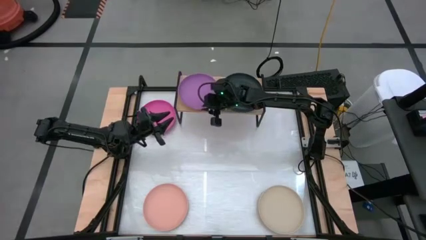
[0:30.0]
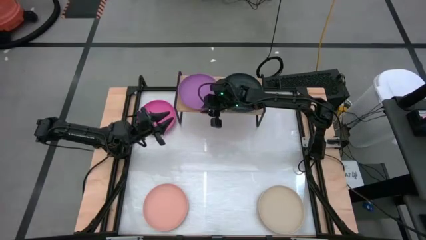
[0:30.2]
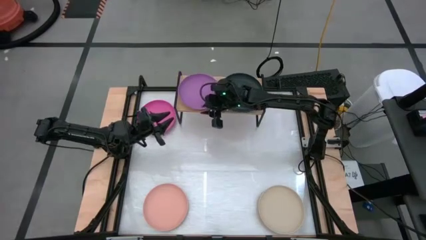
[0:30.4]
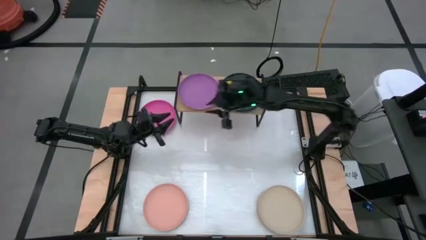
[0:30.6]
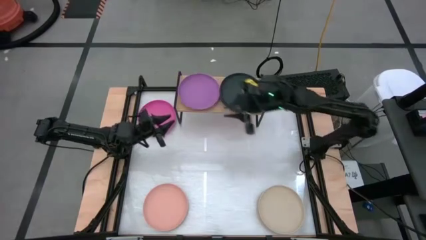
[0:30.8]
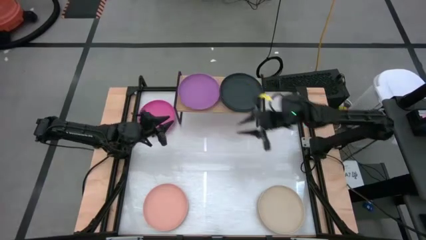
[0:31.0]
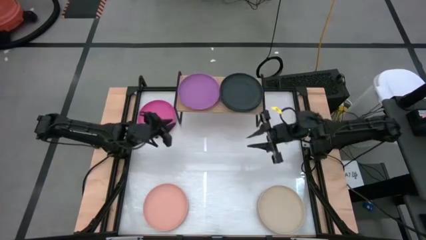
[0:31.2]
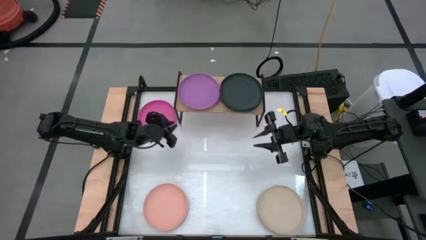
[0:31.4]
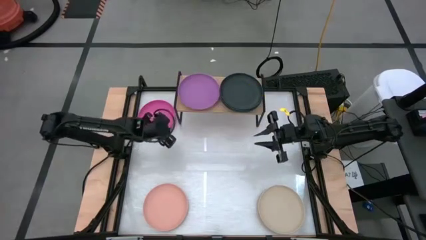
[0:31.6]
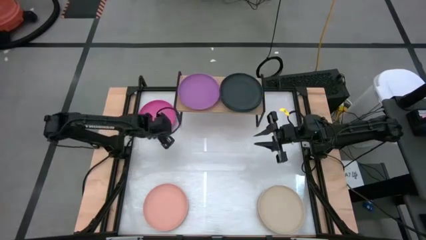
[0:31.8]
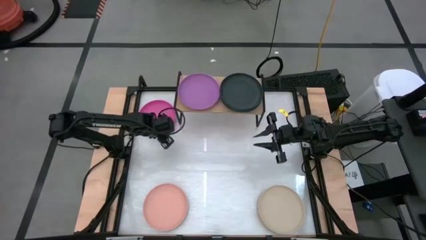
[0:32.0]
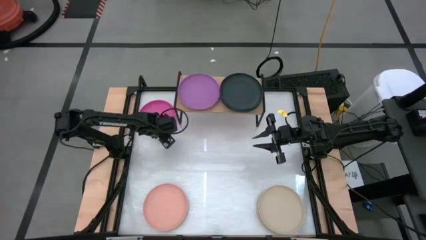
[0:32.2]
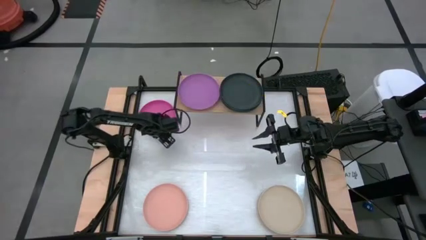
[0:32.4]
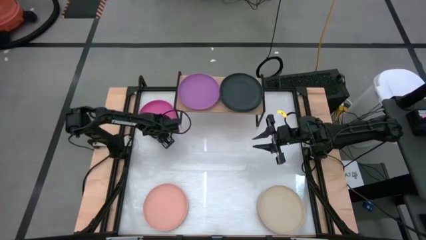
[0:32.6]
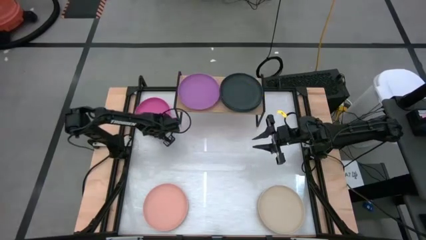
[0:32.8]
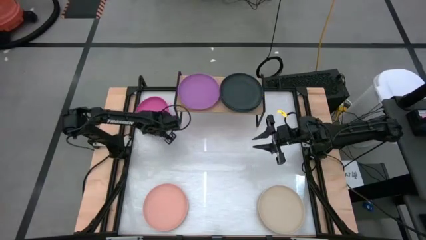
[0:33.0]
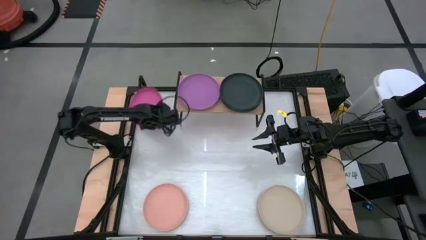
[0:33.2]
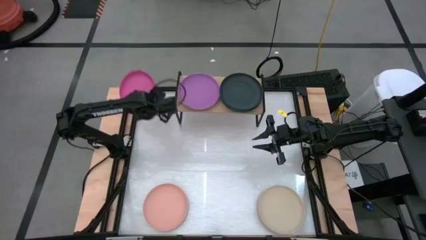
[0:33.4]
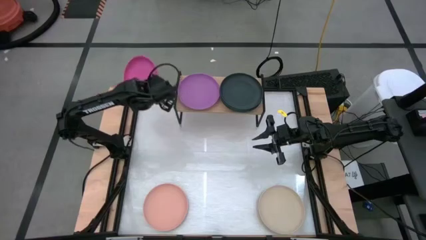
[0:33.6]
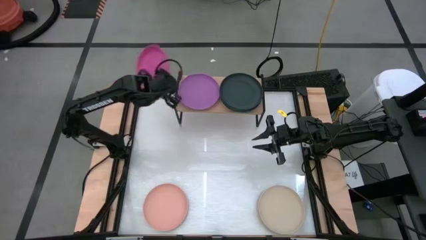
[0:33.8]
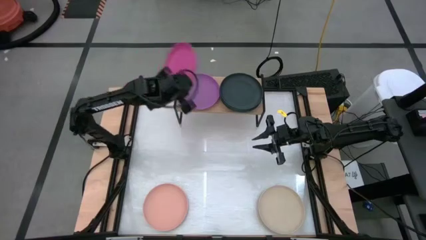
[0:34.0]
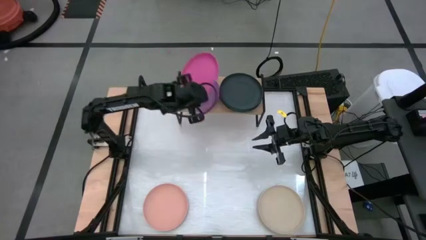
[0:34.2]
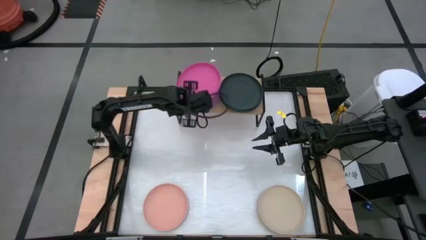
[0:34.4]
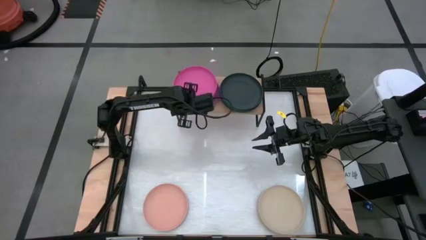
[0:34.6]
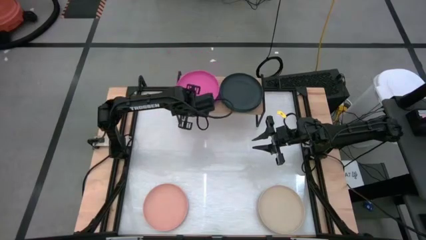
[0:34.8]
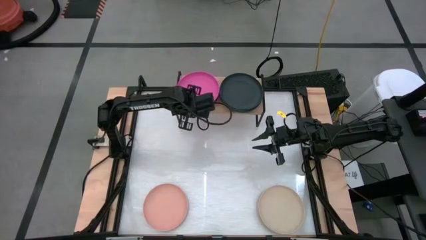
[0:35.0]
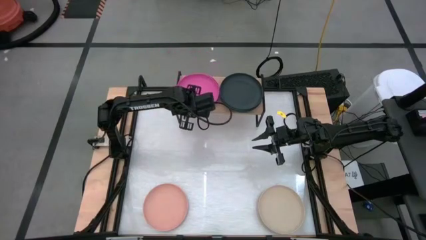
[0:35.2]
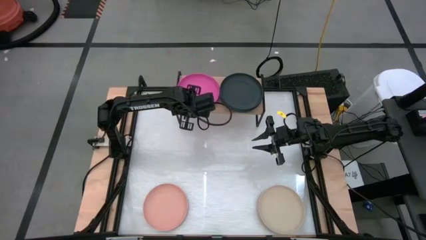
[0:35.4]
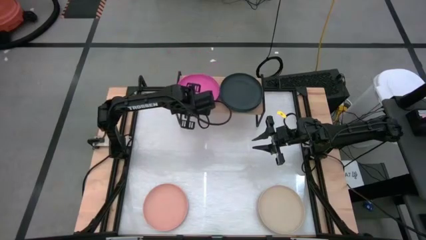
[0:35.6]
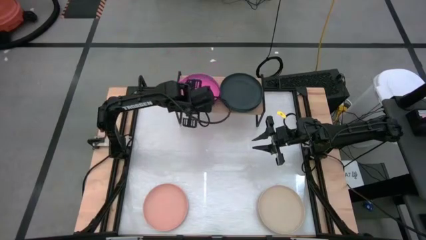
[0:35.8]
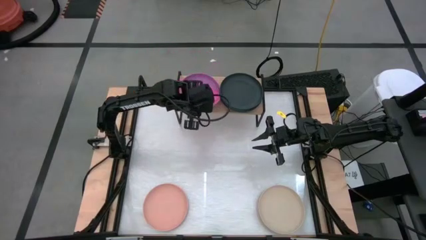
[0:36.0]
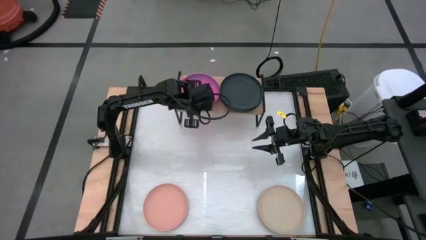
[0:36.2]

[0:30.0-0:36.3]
Task: Place and stack plates onto a shelf
Stack the pink plate on the purple plate

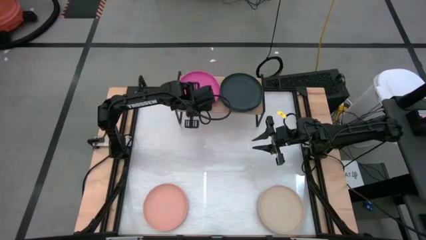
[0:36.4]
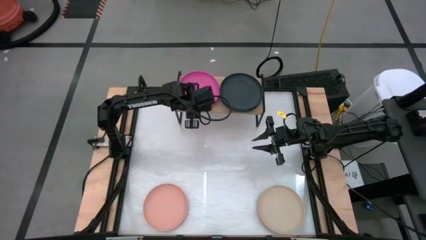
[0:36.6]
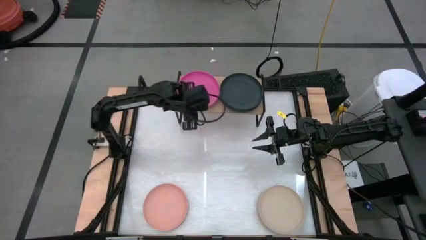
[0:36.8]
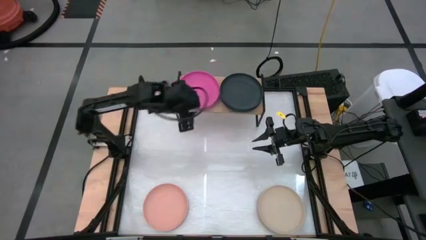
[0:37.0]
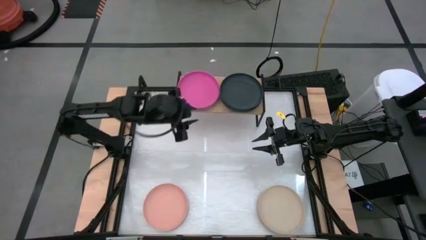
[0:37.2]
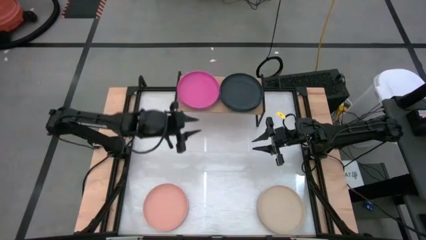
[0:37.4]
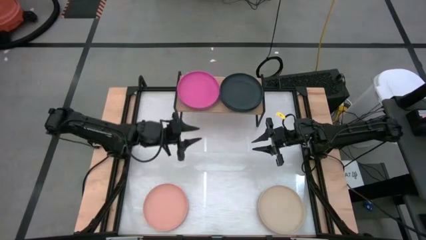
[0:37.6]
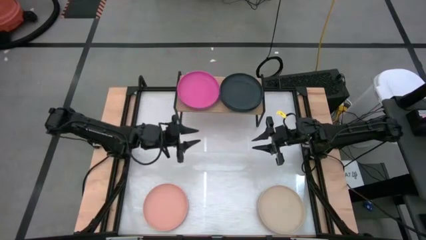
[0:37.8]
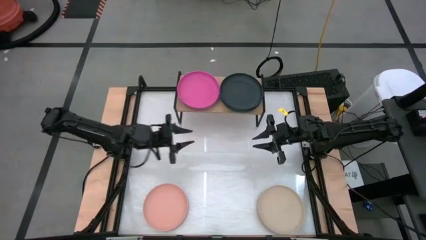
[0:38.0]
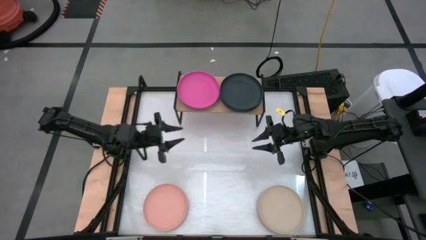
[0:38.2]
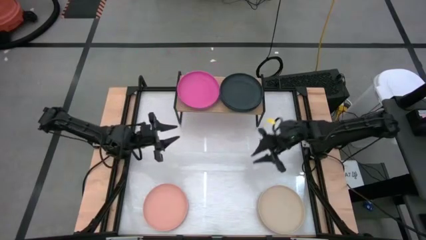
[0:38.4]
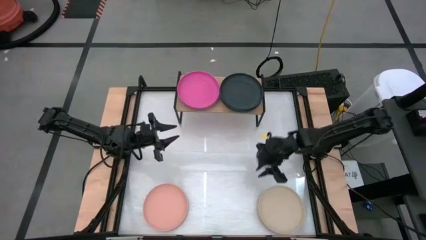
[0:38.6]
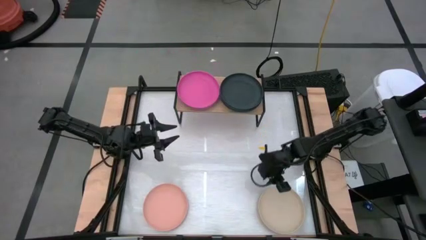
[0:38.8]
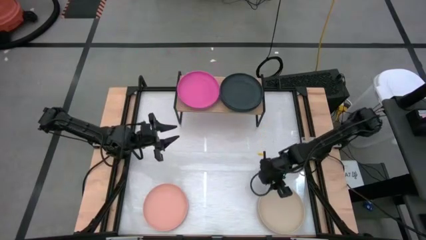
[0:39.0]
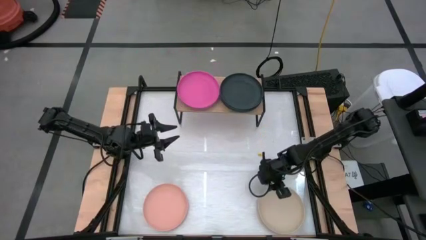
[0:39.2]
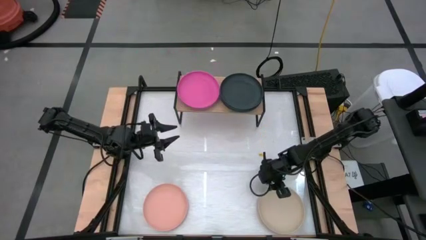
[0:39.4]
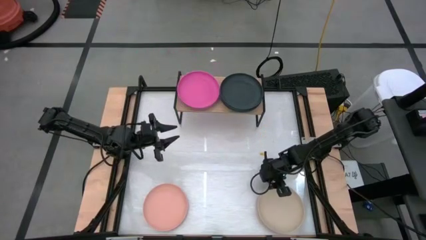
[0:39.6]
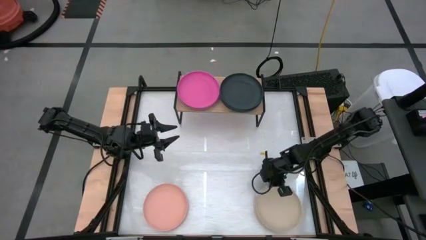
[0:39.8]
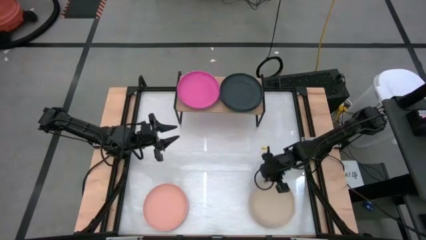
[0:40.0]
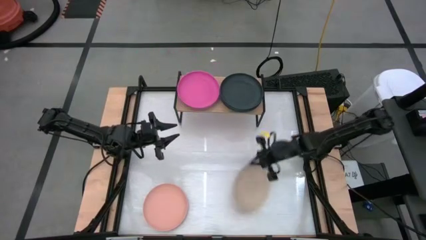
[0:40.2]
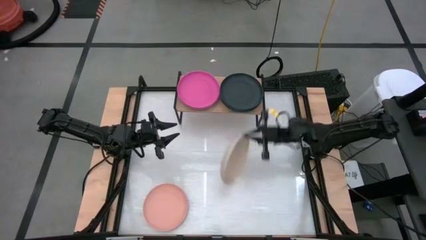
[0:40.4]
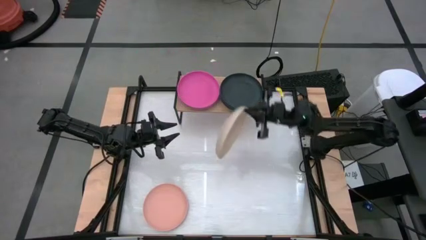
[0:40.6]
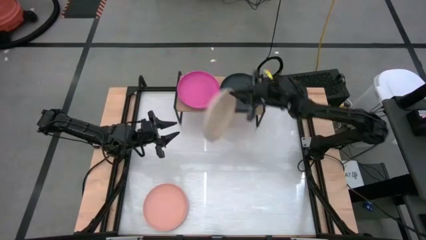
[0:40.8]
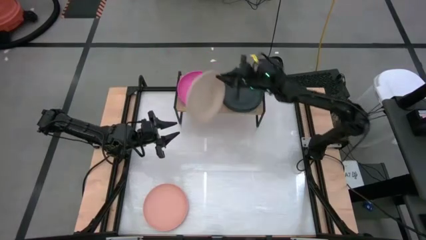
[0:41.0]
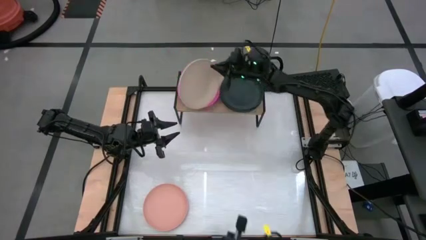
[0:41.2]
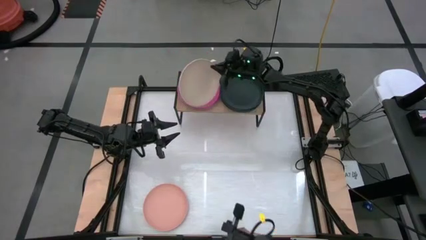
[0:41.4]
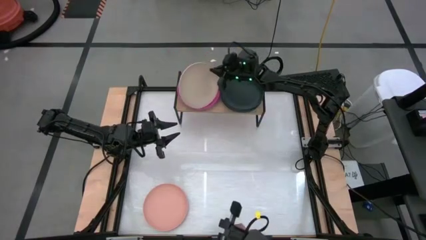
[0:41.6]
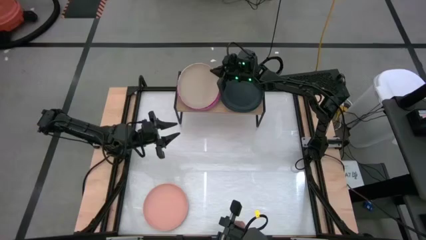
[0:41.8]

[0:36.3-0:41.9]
Stack the dark white plate on the pink plate

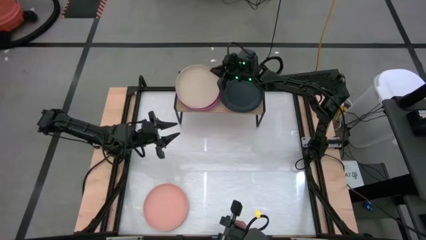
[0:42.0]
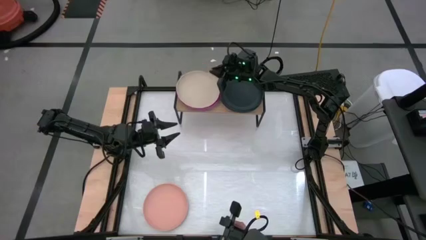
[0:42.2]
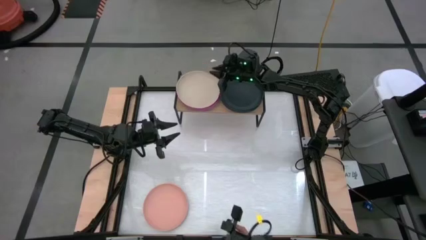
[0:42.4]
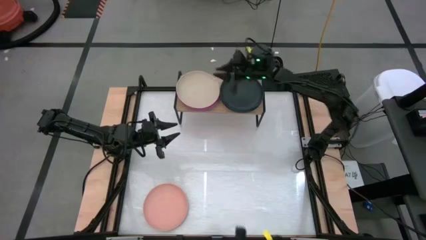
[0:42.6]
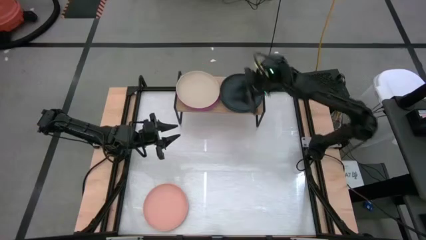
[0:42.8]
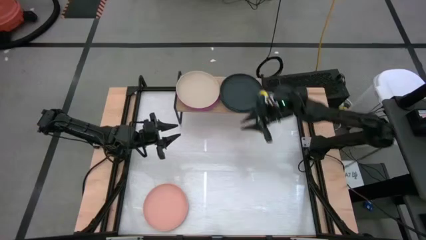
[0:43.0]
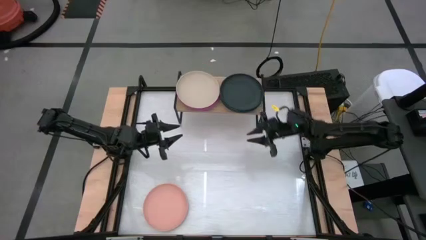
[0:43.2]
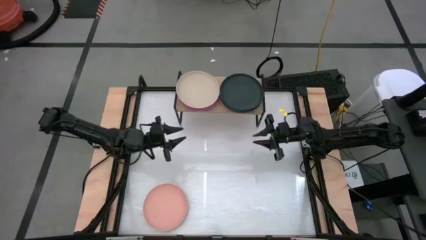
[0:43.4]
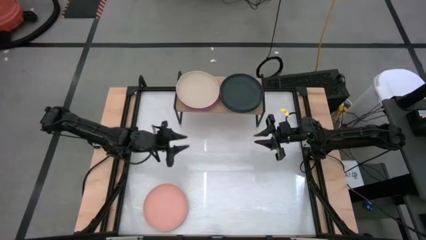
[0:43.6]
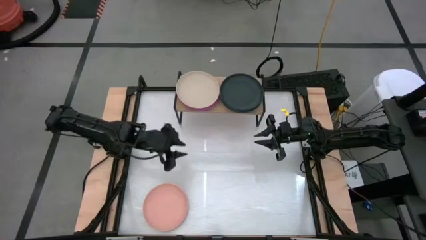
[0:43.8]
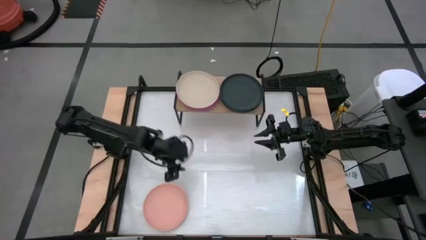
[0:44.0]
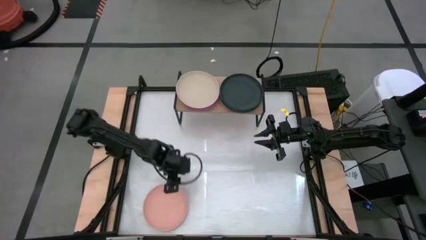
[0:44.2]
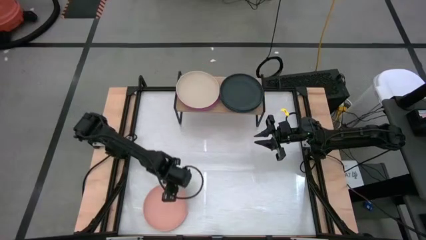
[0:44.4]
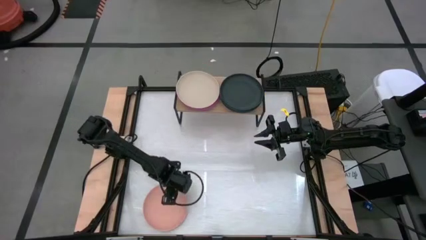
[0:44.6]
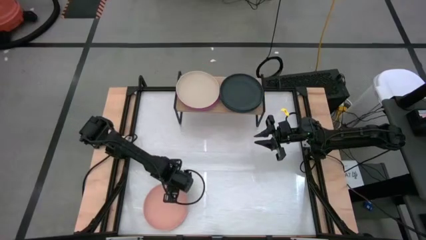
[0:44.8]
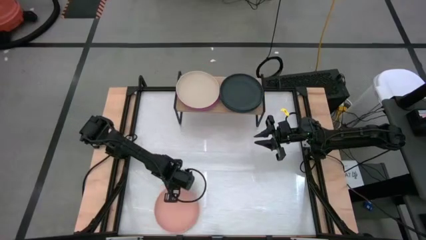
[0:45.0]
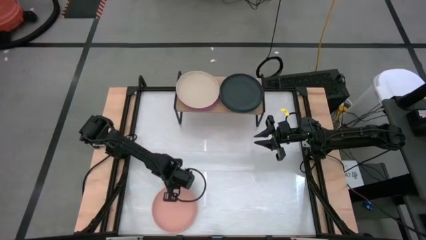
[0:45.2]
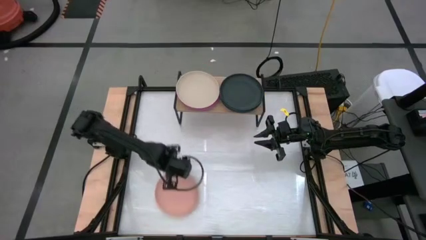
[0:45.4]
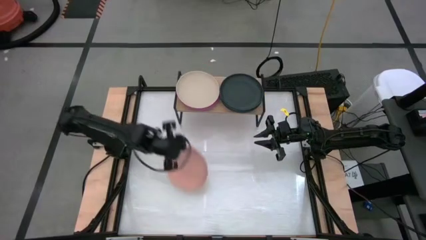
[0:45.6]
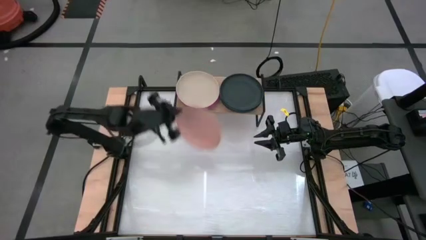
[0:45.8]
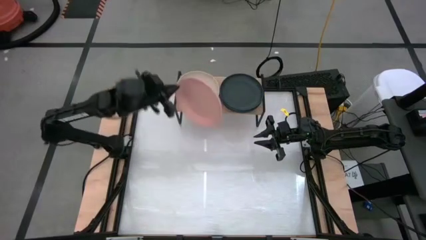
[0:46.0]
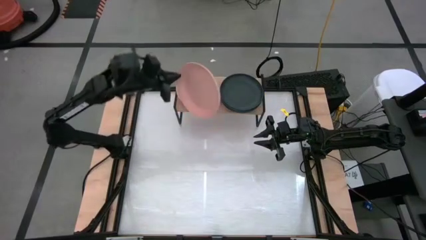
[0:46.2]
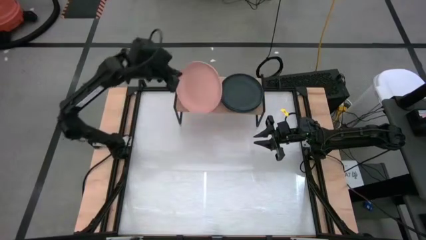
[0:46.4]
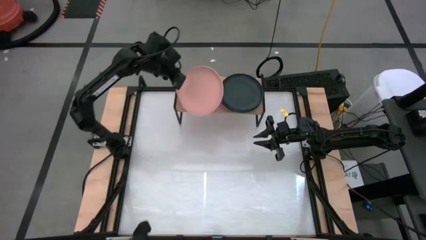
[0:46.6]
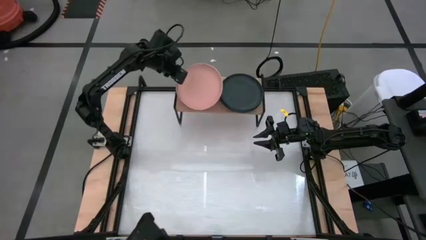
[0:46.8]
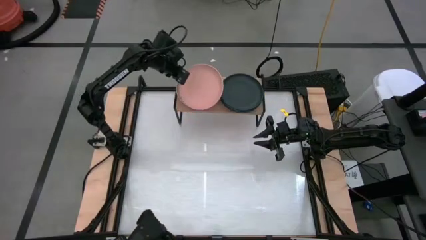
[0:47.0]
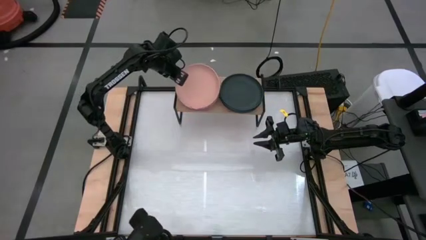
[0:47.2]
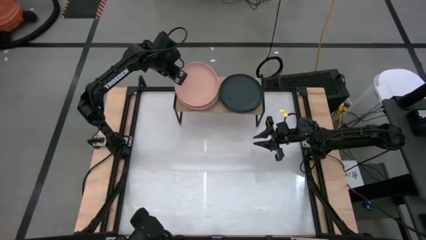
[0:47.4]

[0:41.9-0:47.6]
Stack the light pink plate on the dark white plate
